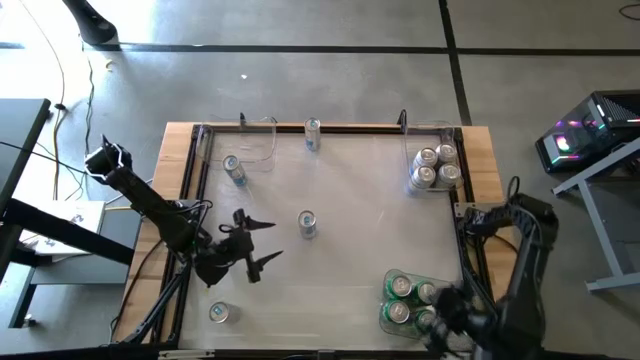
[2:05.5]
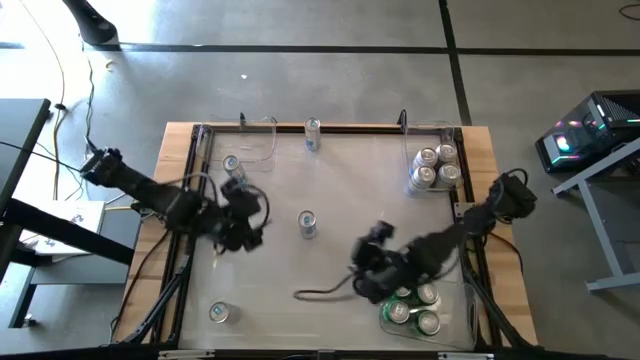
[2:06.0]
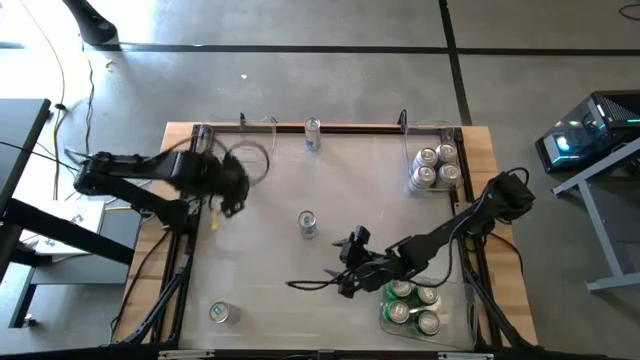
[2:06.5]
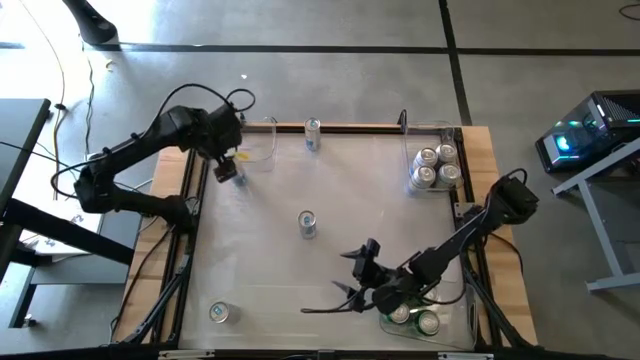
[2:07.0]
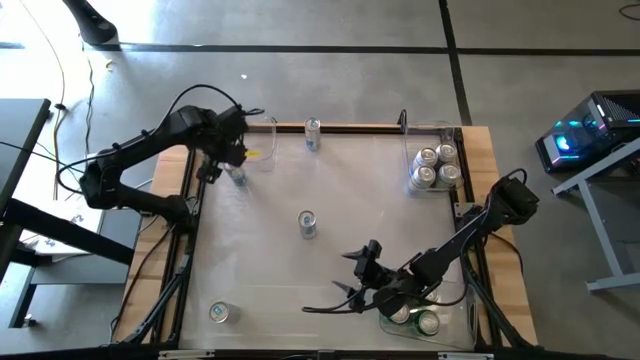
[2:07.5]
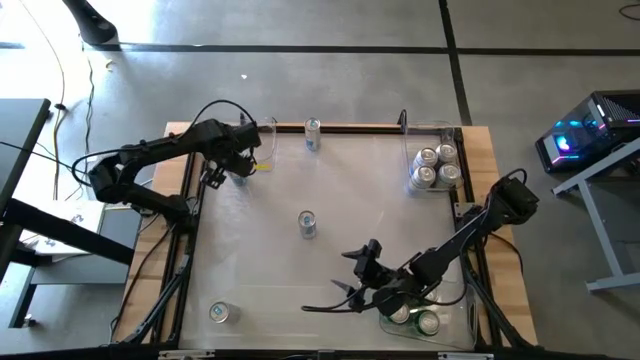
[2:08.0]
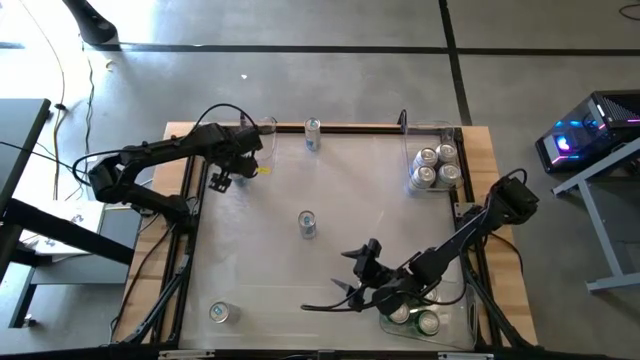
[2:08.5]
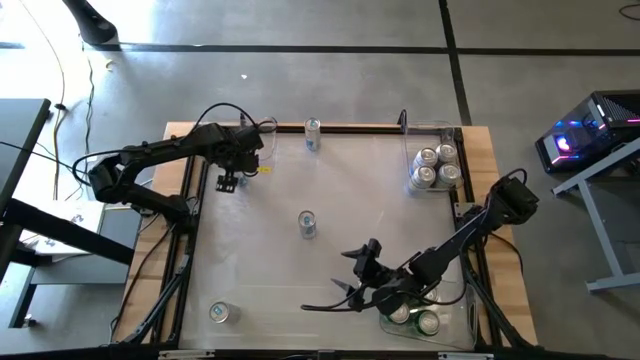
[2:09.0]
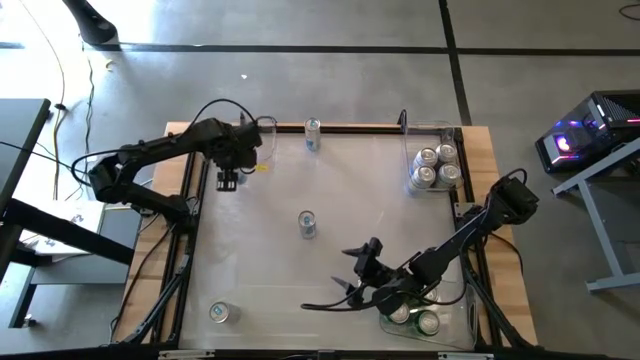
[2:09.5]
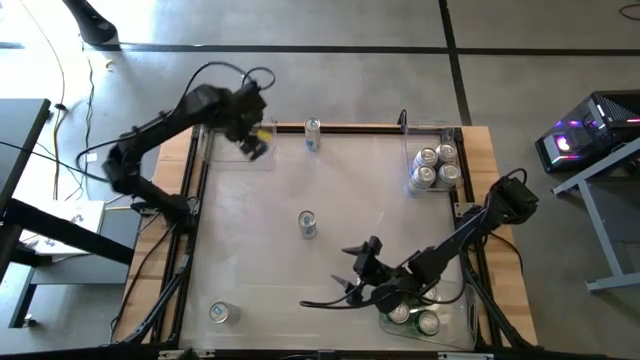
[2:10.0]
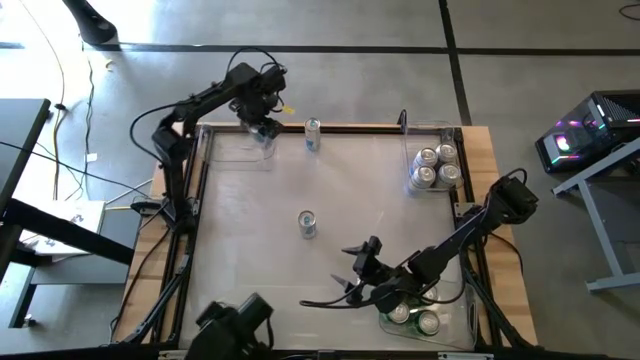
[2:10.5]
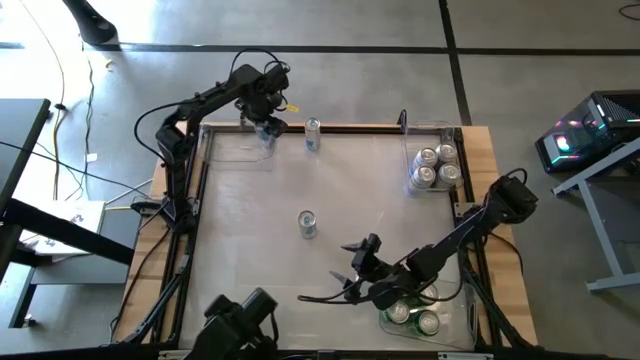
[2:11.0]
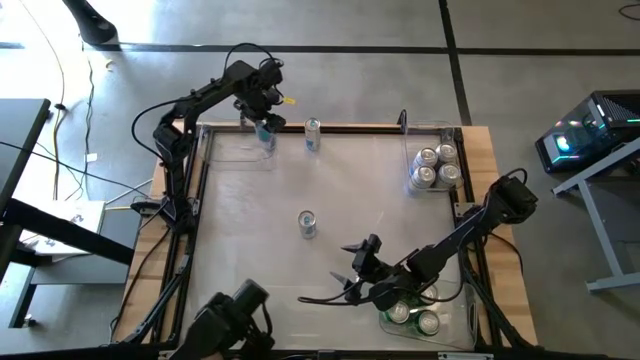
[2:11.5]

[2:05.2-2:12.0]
Task: Sort soda cans
Put the top left white blue soda can into the top left transparent bin

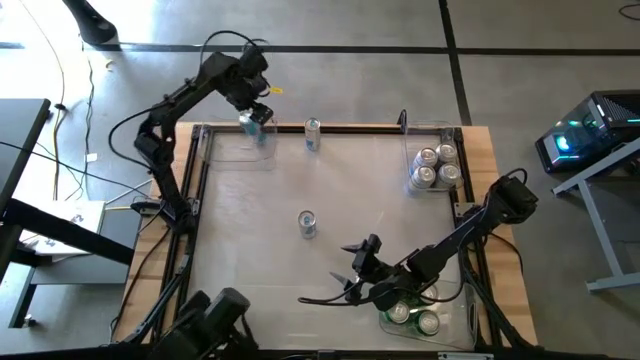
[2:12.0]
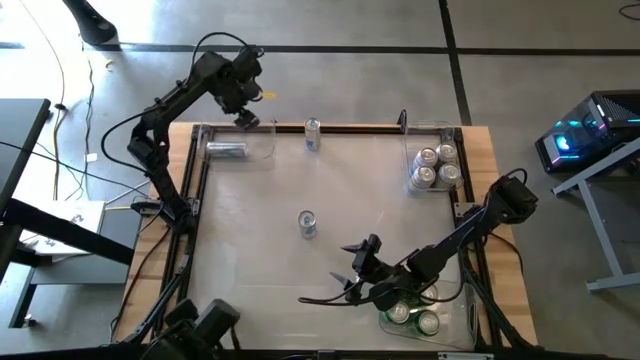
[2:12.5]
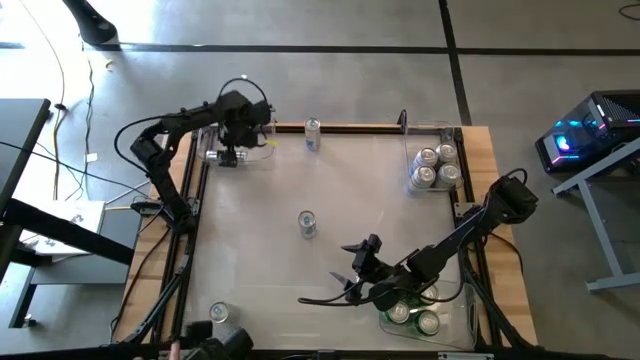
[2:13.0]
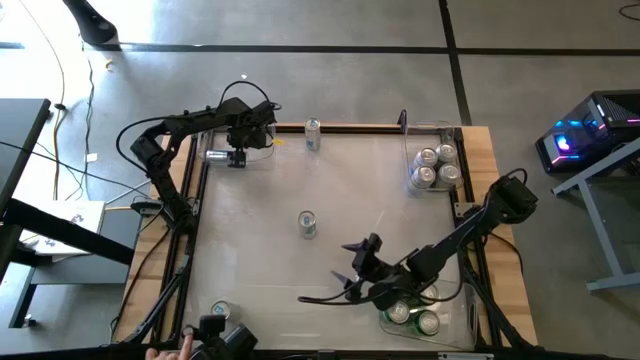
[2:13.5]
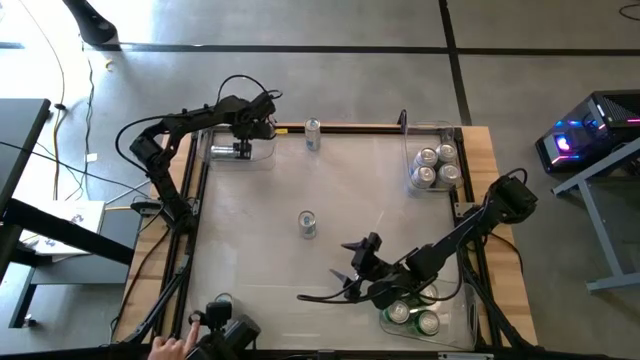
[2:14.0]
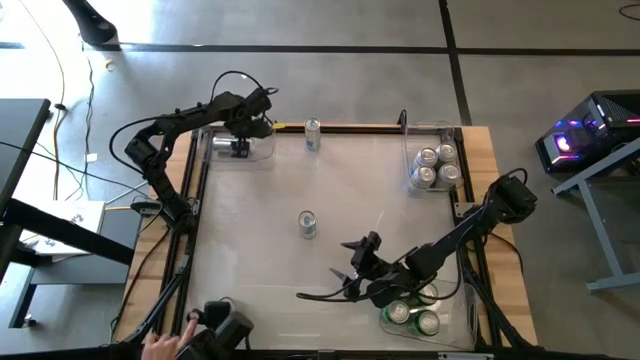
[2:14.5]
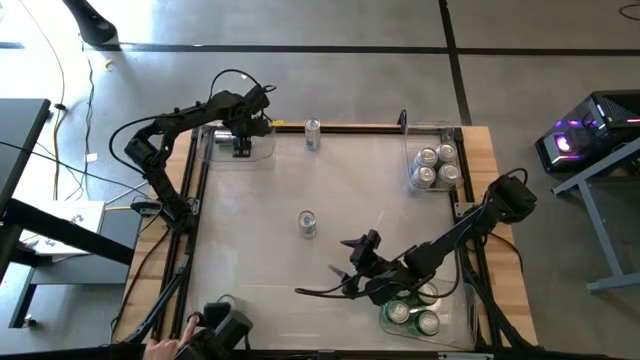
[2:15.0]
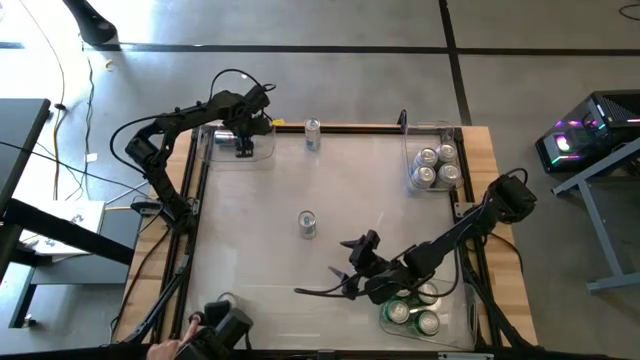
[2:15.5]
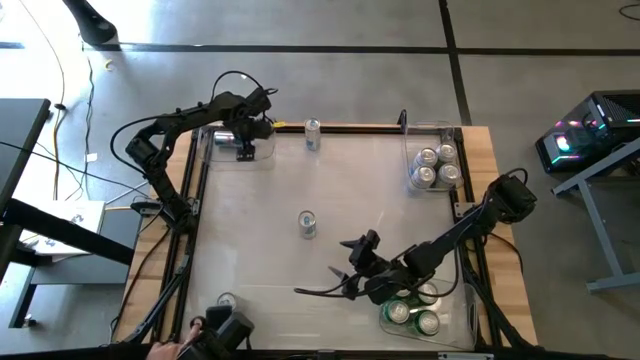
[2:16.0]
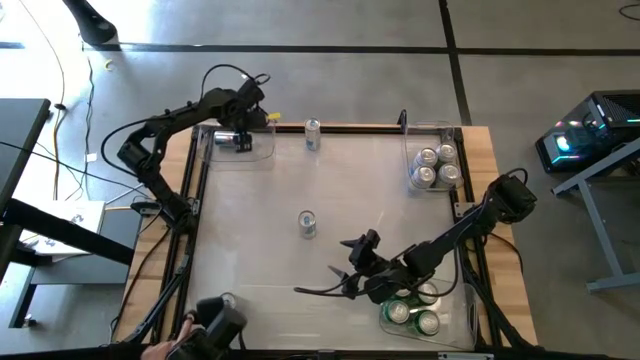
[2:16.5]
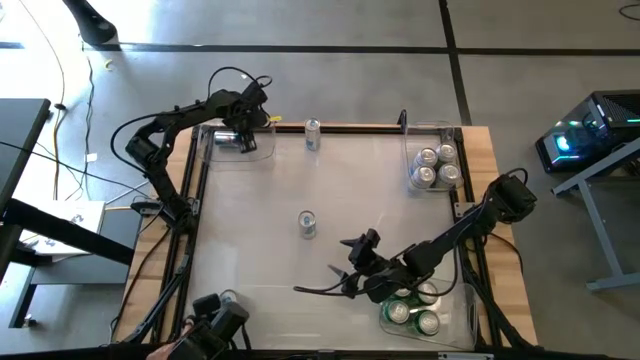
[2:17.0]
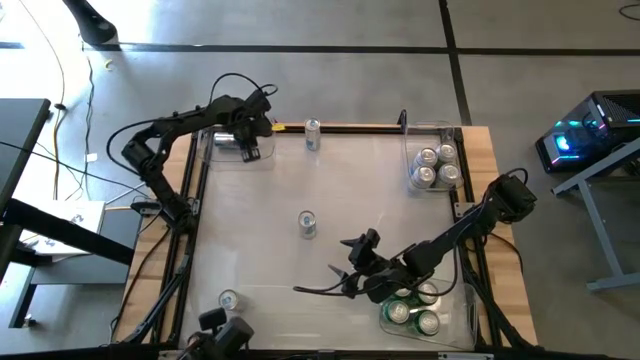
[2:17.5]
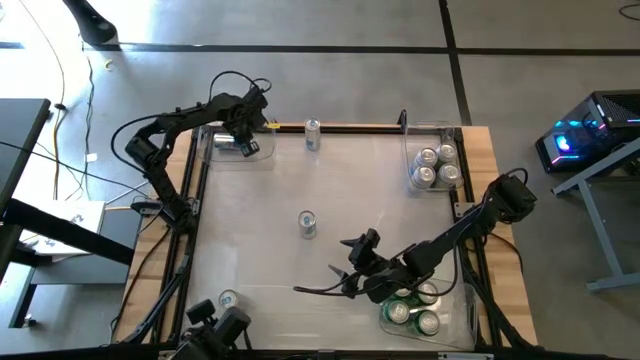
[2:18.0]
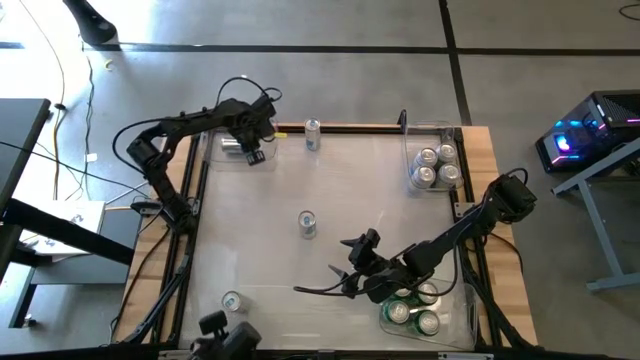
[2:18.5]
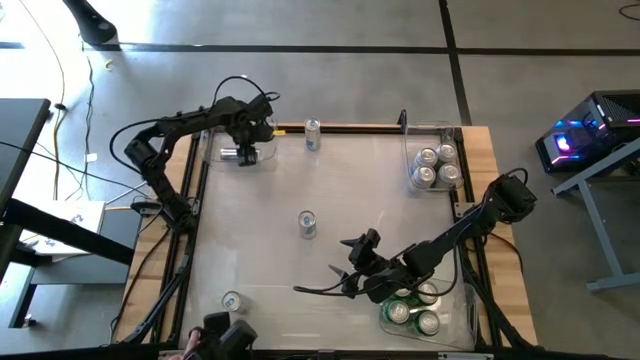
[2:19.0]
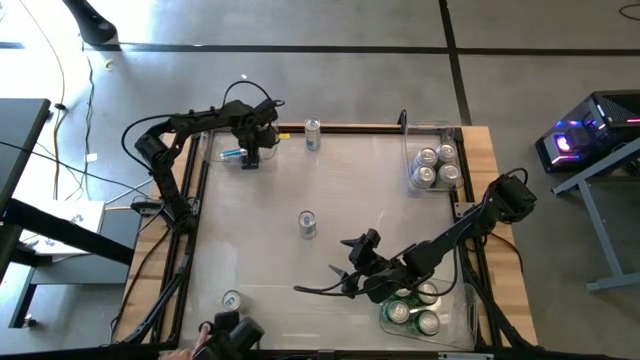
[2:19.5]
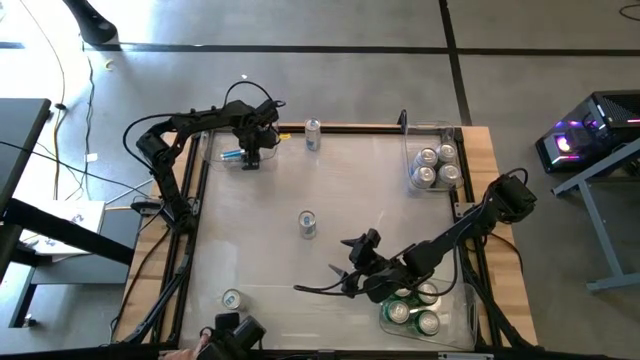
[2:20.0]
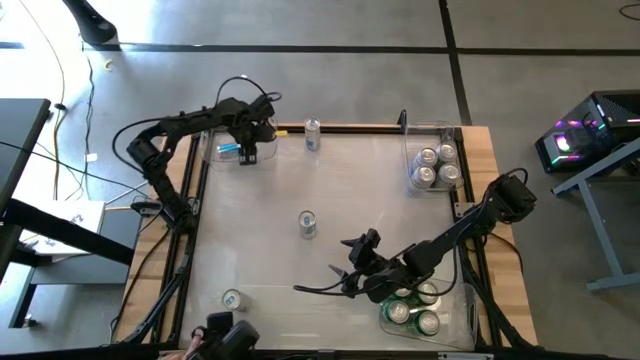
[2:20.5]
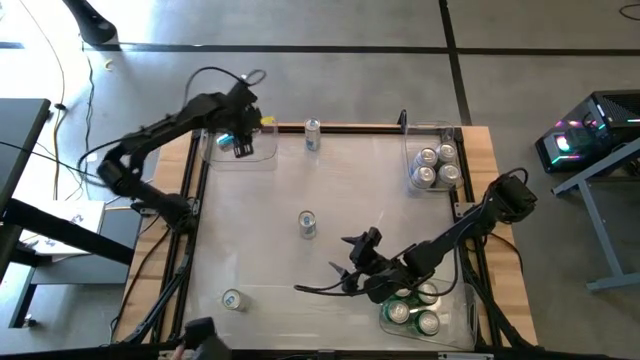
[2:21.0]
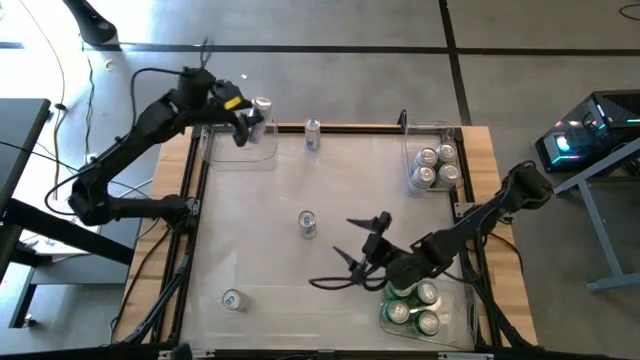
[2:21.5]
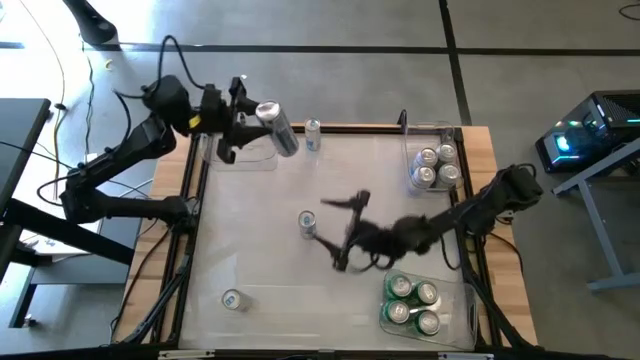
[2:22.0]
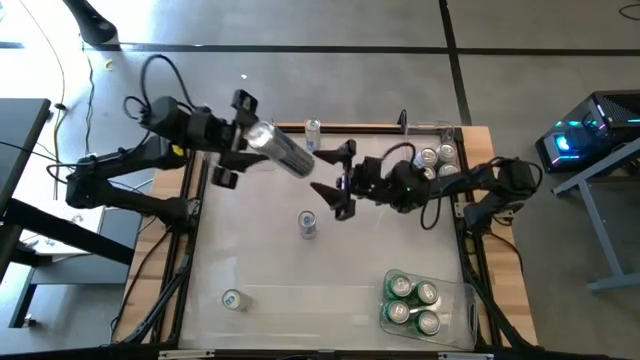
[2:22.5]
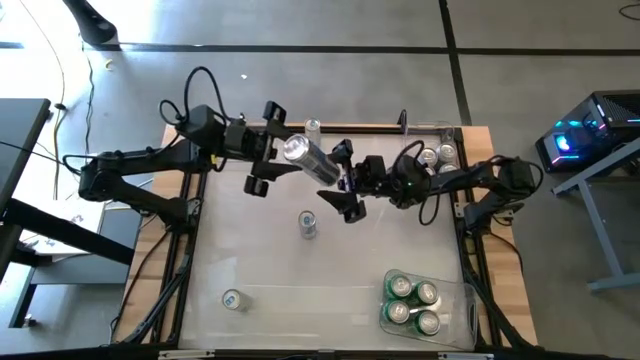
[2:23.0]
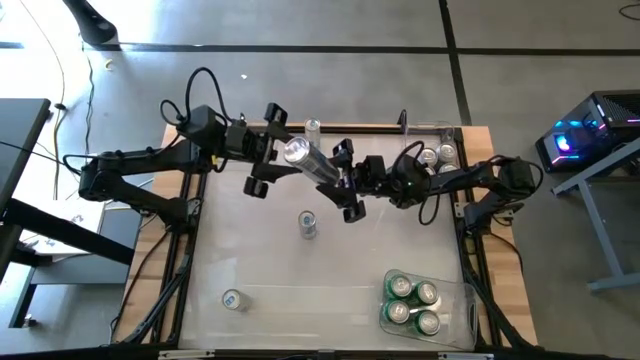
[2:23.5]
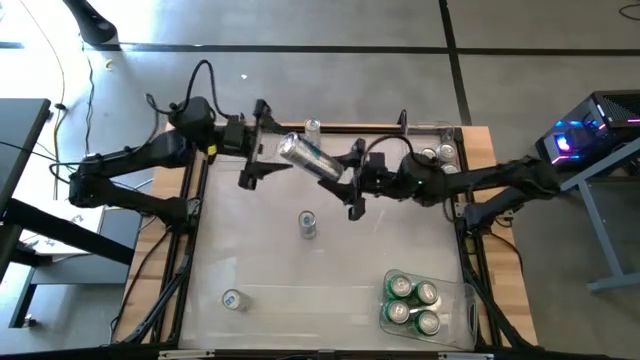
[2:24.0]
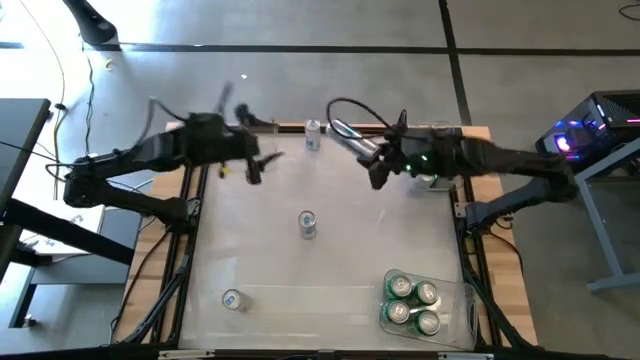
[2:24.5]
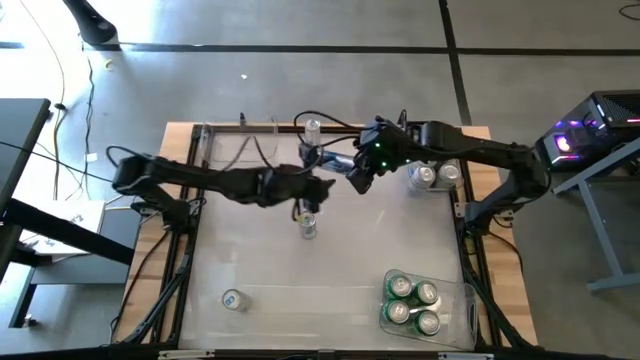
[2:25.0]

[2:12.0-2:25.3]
Put the top left white blue soda can into the top left transparent bin

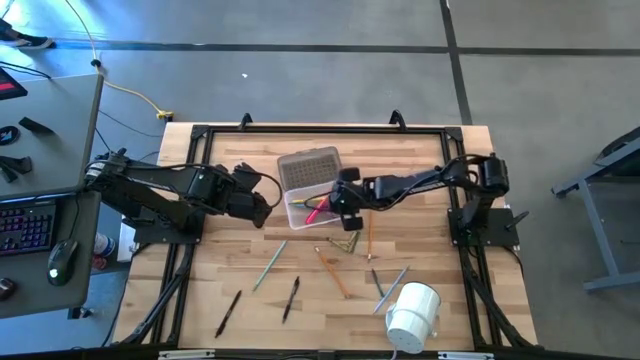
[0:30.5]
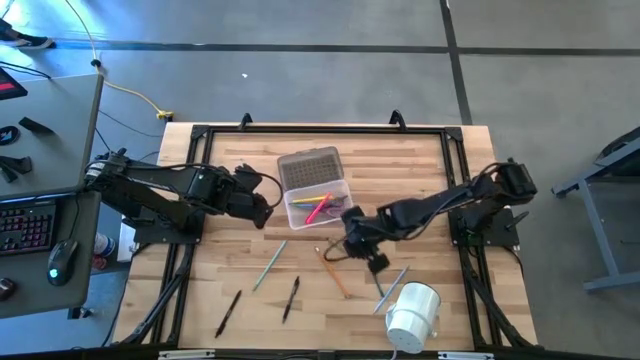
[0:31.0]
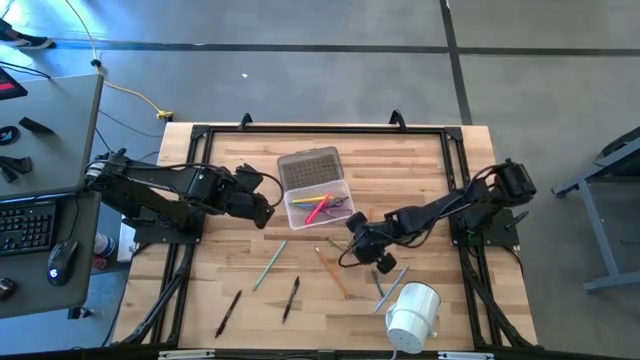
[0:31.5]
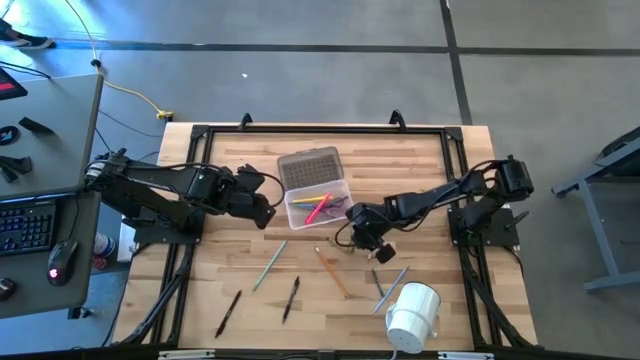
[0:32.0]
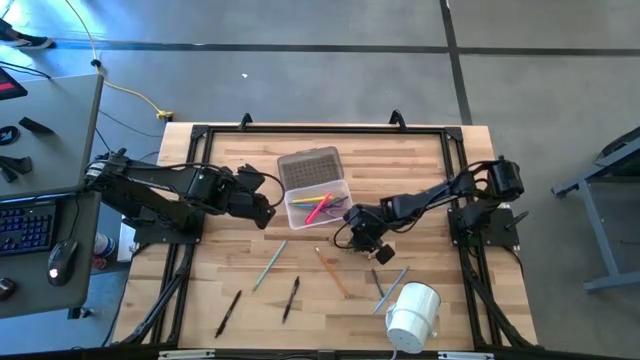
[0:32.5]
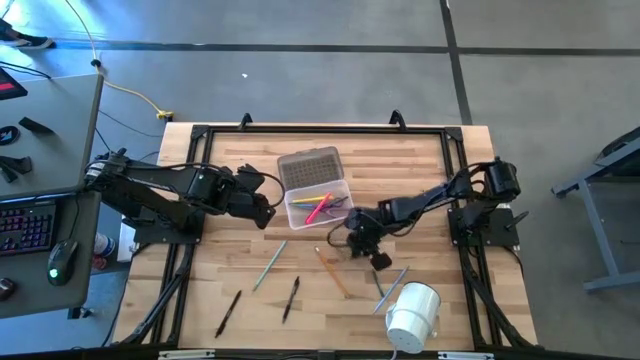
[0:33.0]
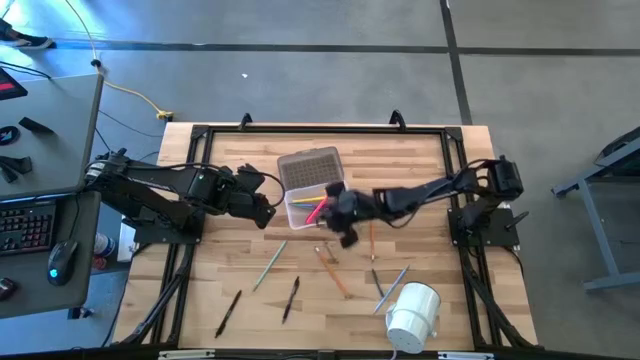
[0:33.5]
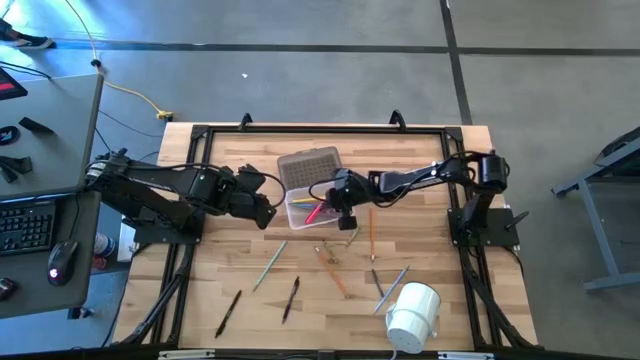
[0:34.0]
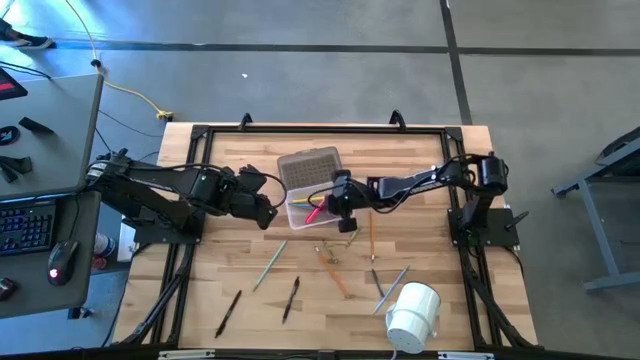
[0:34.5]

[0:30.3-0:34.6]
Task: Pick & place school supplies into a supply box
Put the top green crayon into the supply box
